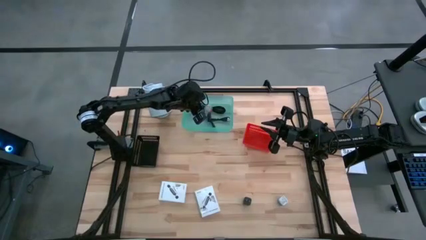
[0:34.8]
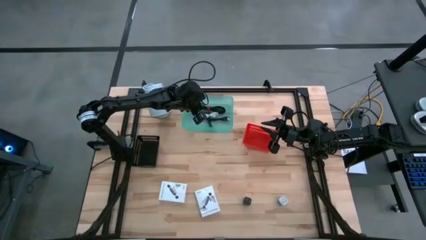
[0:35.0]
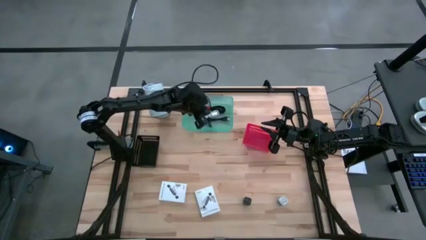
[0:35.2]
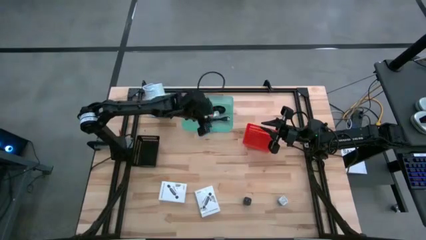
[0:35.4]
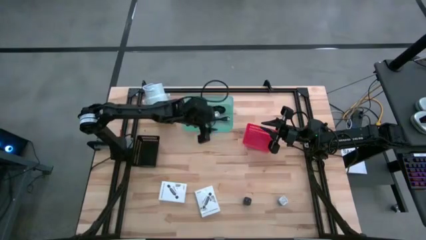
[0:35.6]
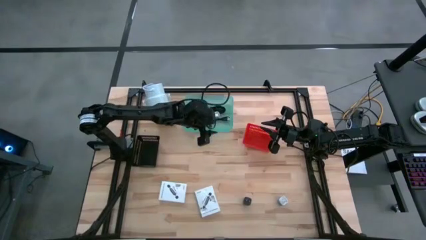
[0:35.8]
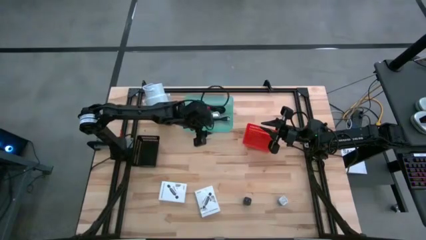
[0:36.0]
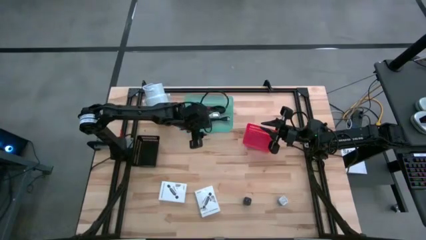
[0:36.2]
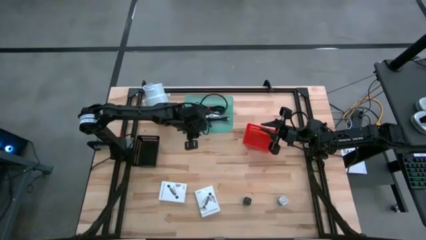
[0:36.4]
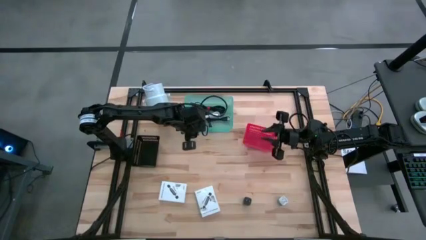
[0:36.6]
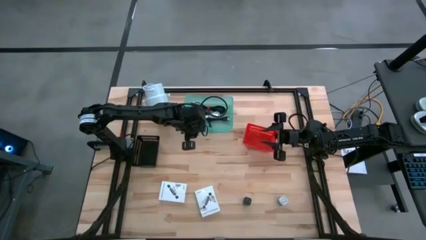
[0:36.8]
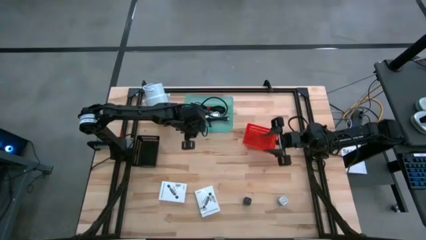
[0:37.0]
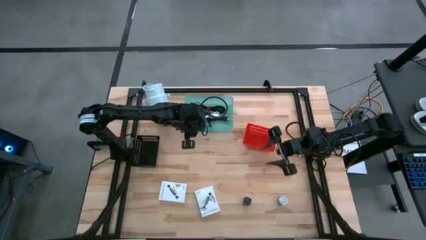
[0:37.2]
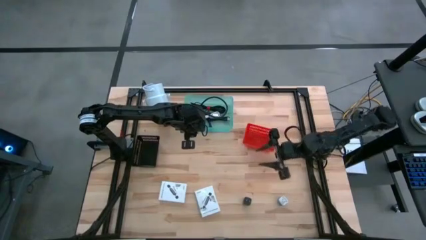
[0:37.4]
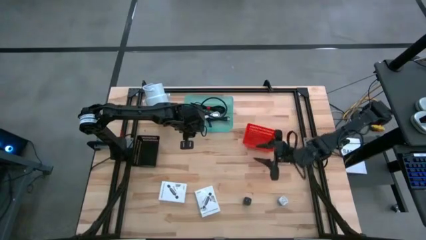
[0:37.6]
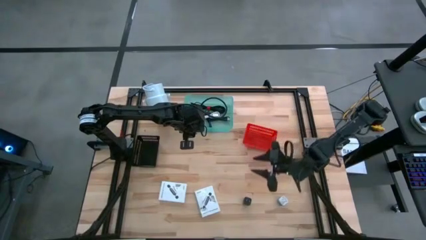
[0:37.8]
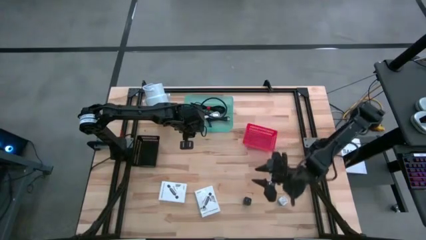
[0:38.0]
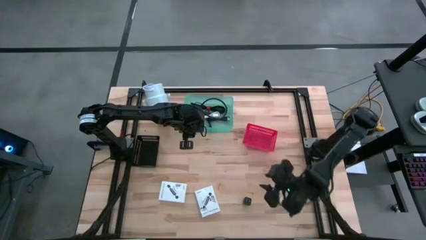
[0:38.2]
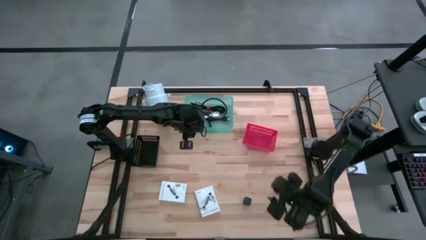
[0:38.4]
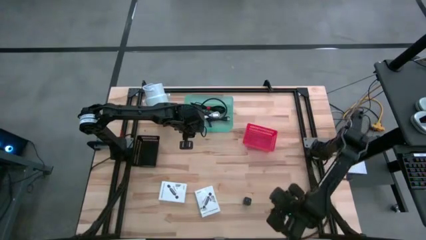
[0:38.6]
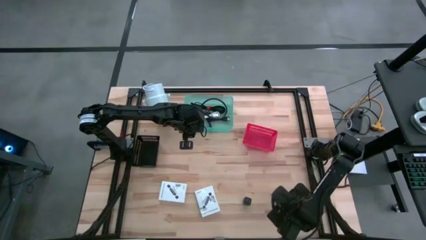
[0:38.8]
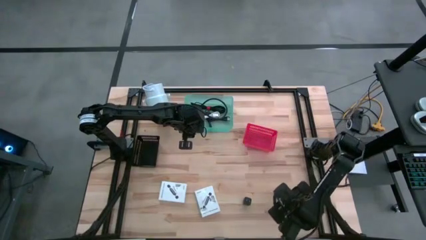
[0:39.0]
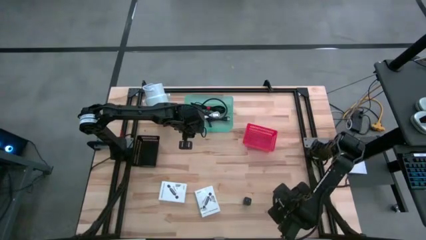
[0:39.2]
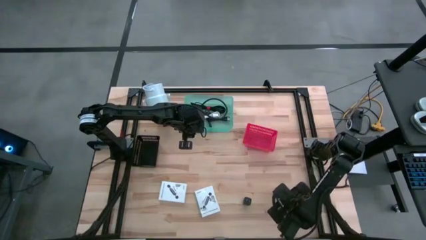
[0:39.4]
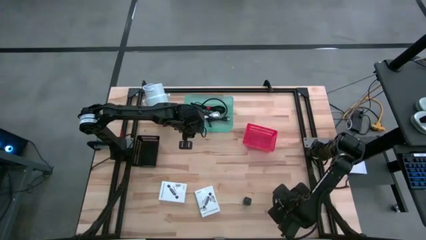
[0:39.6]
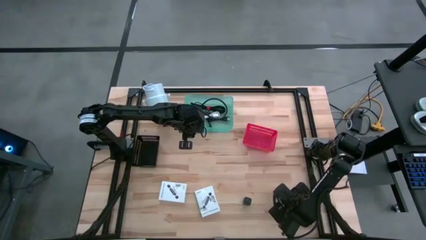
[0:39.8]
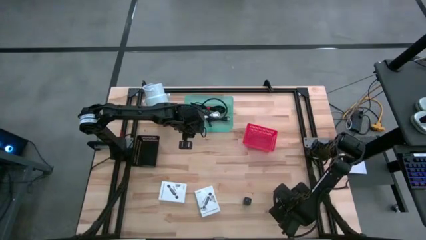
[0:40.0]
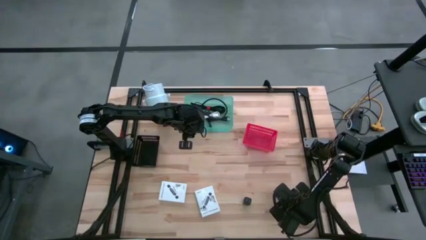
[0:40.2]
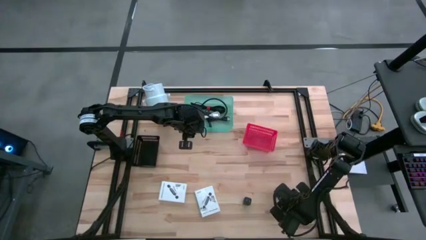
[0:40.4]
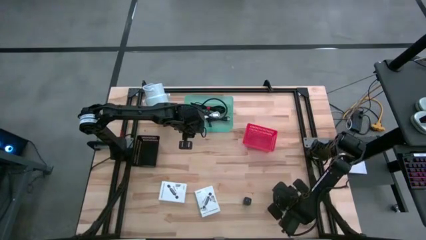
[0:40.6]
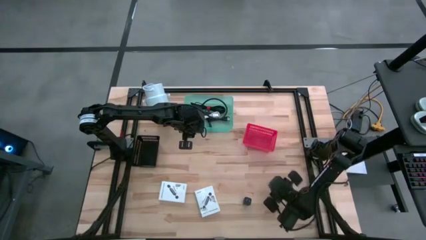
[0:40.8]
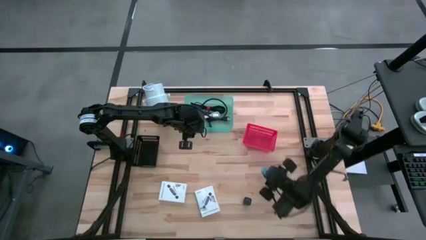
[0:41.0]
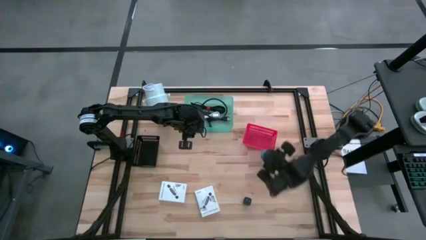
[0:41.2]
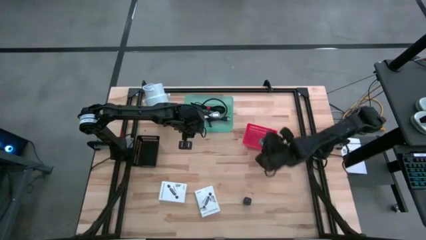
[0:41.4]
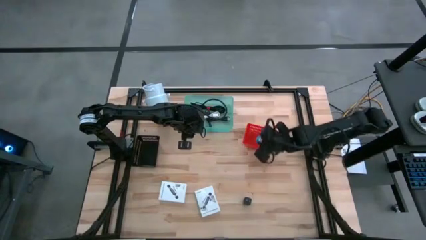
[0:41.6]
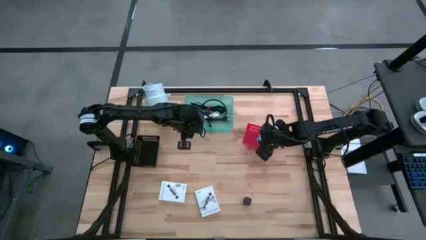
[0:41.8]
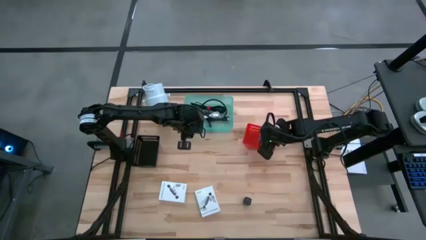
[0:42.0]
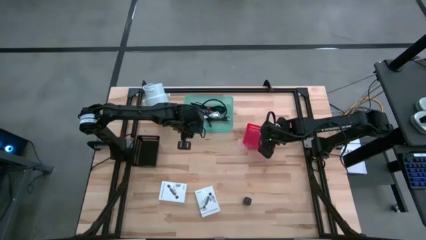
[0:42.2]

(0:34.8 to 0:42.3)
Task: Pick and place items into bin
Put the blue charger adapter into the red basket

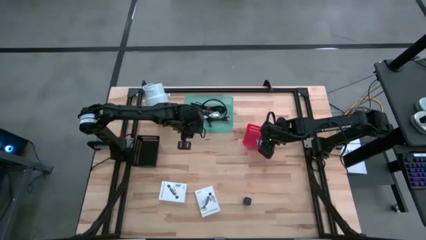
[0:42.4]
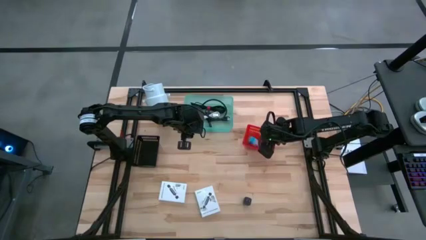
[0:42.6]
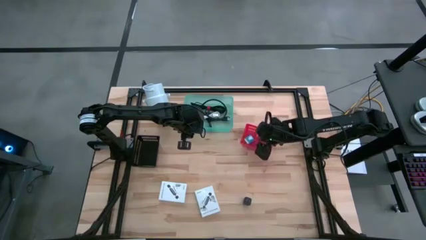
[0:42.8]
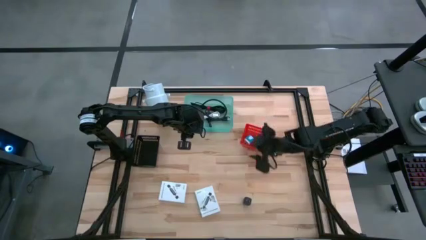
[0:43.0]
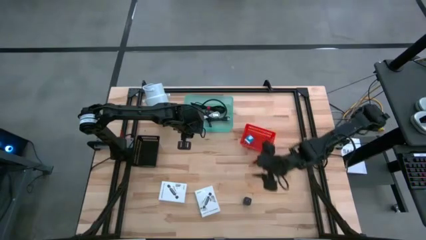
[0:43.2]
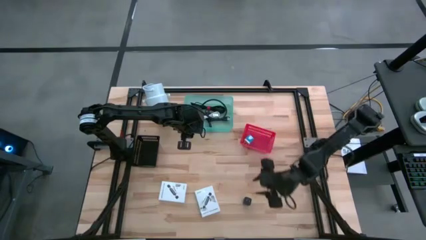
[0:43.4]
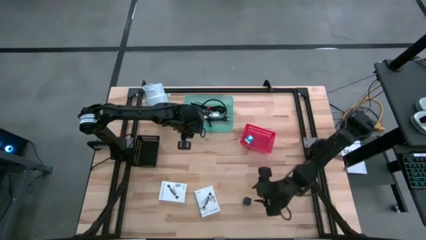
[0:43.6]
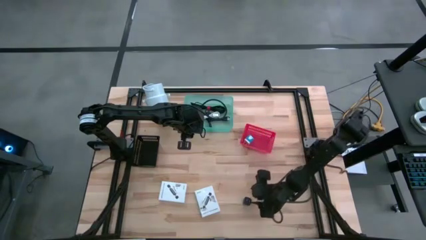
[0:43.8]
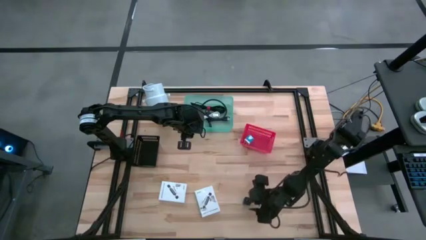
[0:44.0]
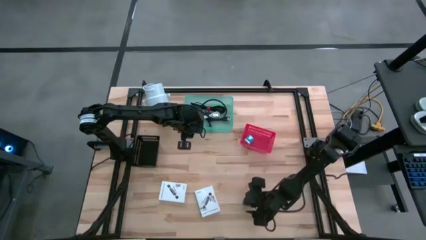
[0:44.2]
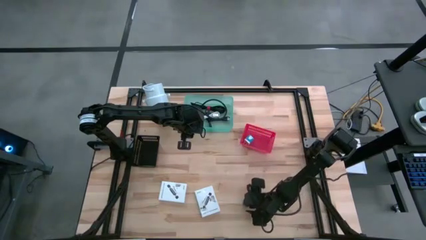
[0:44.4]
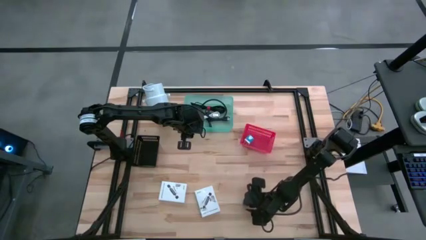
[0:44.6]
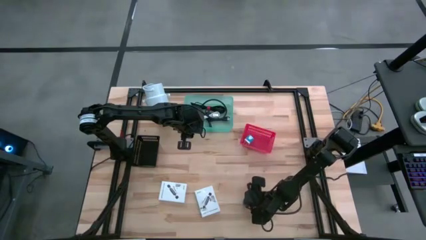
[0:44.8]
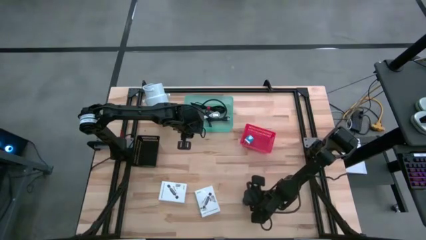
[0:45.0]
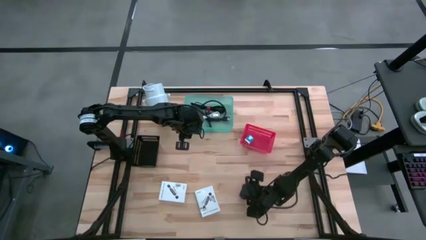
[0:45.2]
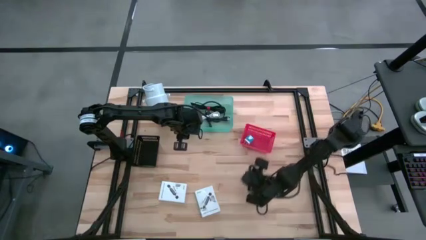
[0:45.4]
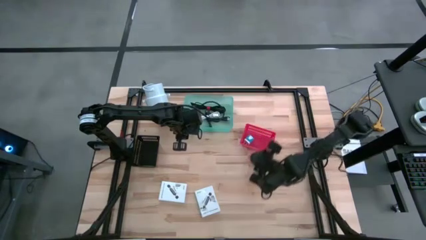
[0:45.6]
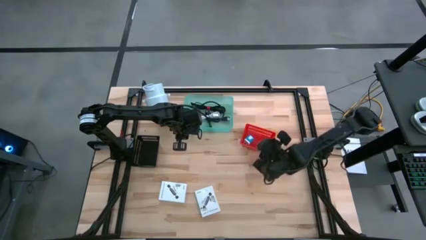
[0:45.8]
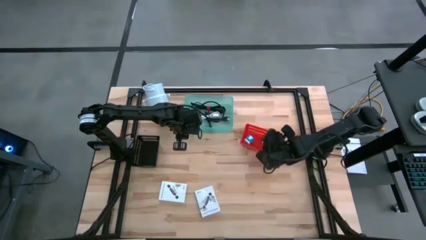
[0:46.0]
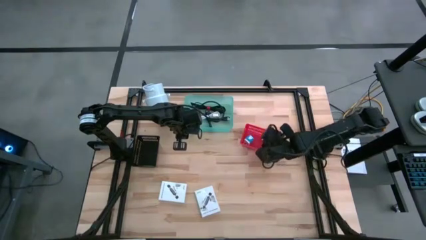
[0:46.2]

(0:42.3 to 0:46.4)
Put the black charger adapter into the red basket

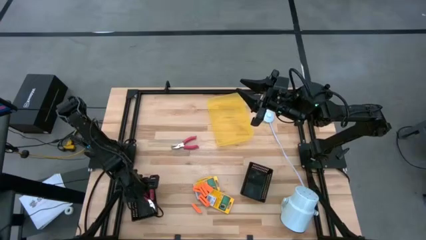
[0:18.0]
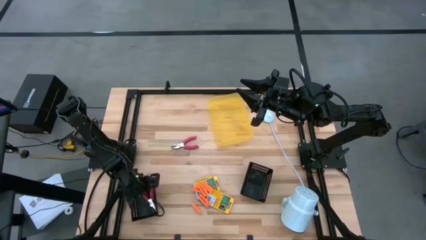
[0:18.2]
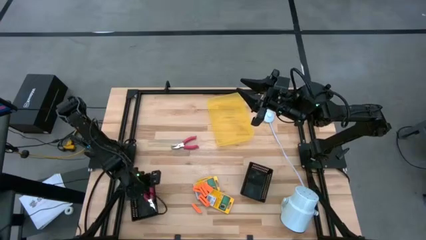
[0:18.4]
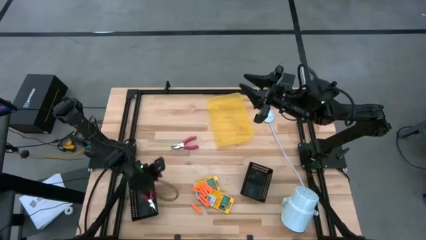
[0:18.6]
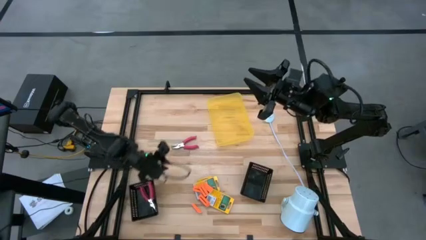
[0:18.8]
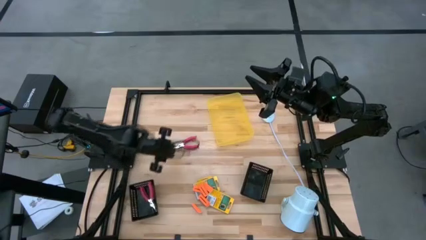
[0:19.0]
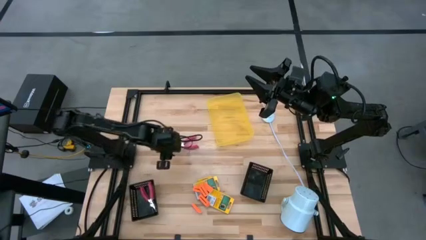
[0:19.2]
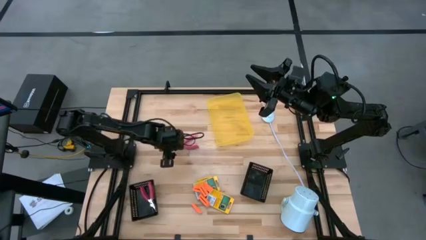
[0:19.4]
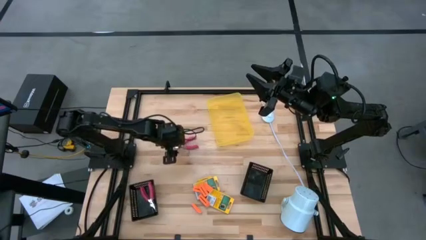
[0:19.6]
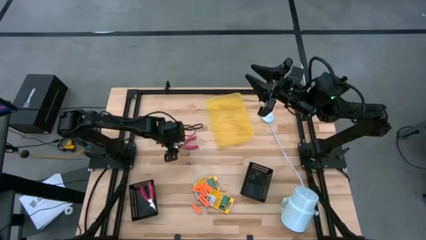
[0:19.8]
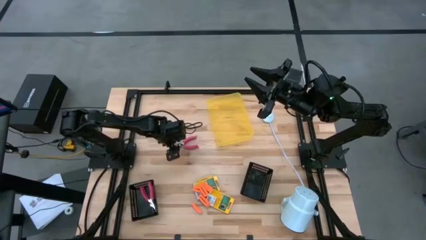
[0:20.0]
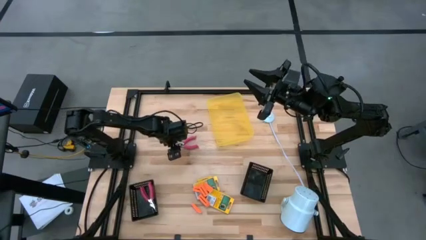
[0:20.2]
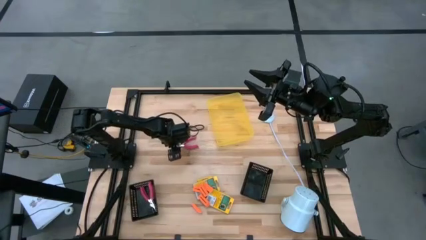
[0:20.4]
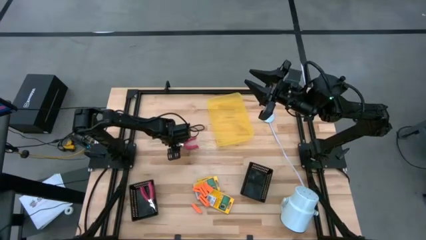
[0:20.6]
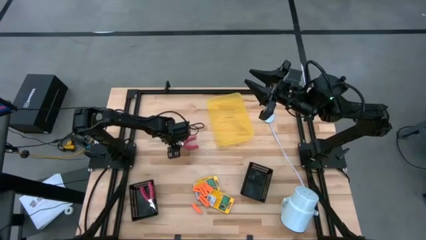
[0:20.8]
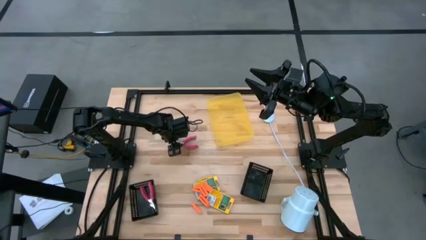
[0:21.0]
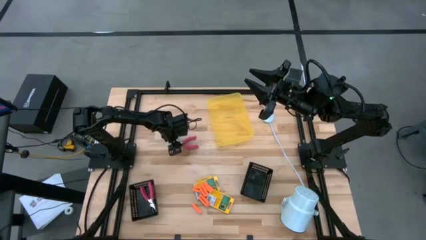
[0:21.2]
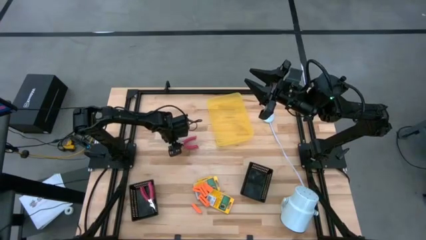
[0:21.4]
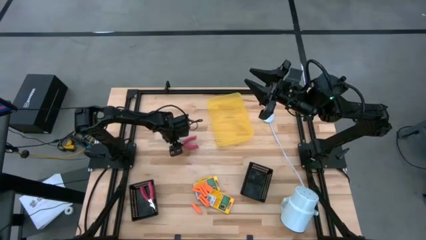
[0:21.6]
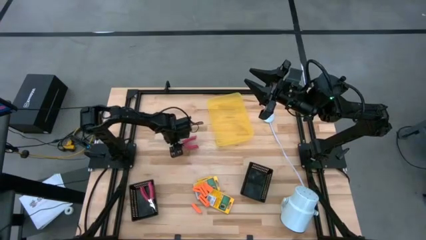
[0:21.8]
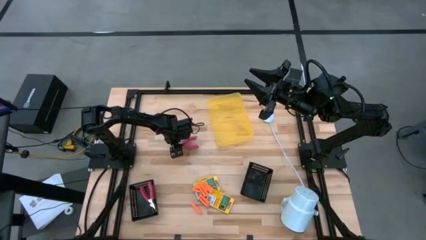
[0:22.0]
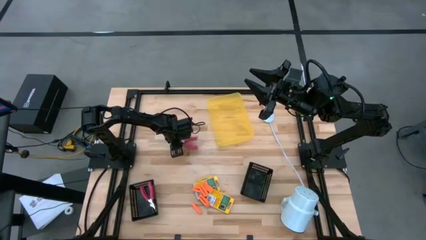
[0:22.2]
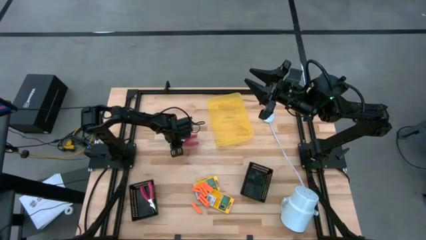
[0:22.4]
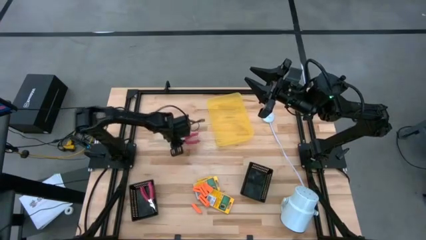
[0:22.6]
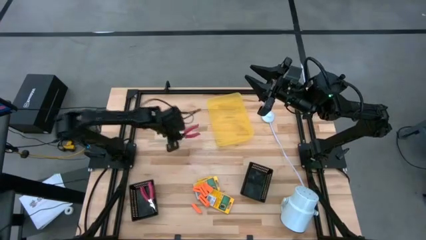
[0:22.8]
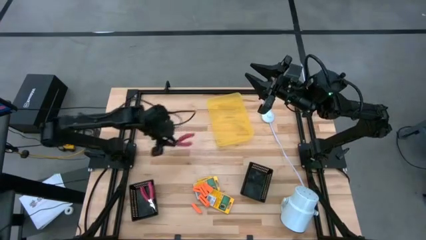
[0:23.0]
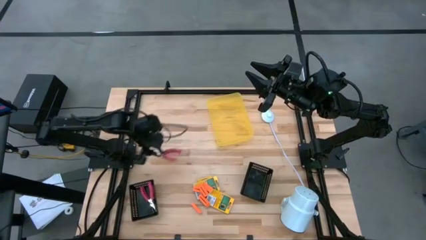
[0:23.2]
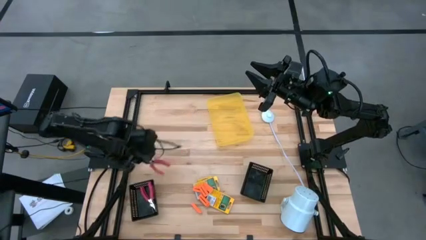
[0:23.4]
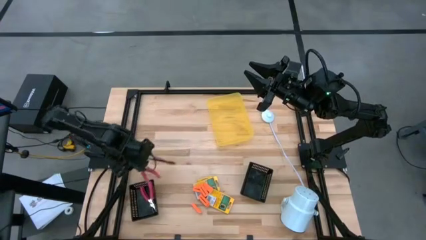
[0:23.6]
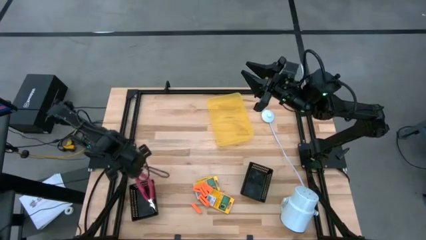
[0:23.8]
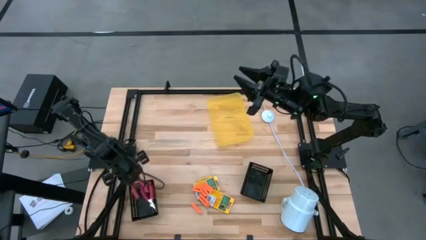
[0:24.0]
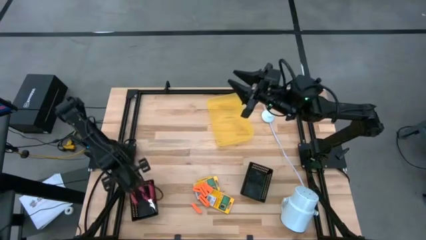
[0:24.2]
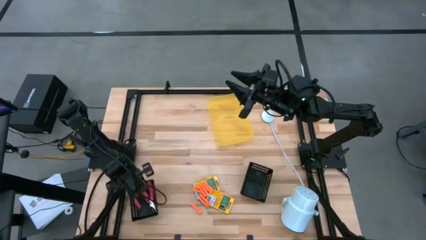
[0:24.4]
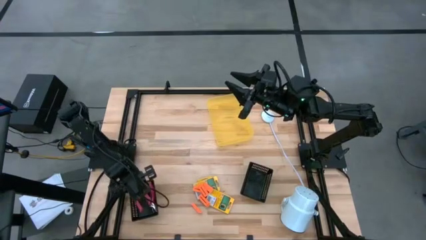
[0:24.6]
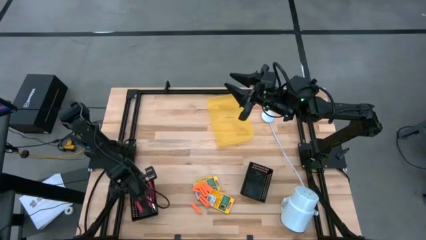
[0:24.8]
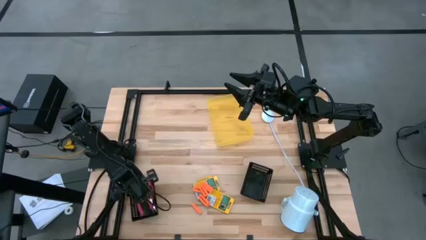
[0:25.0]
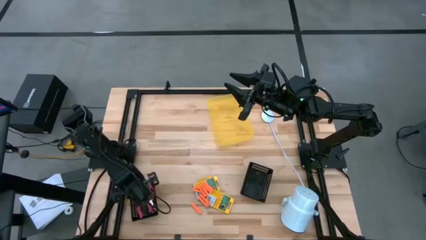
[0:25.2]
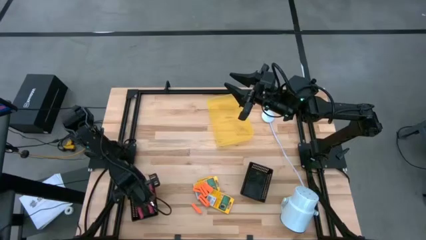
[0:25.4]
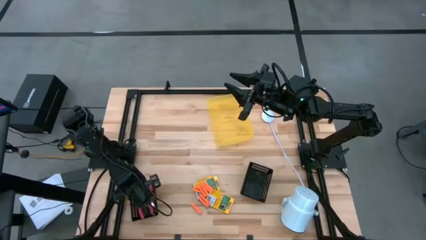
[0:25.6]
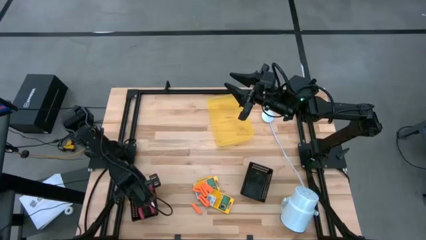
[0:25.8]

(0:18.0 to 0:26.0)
Task: Pick & Place School Supplies
Put the pink puncher into the left black bin
